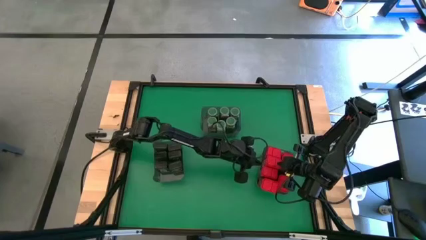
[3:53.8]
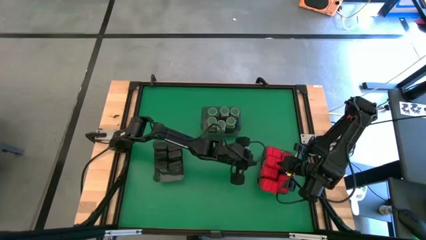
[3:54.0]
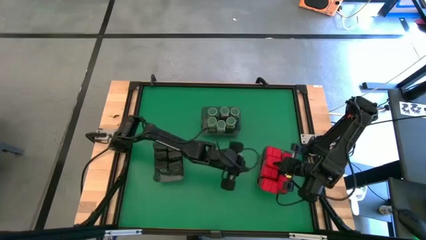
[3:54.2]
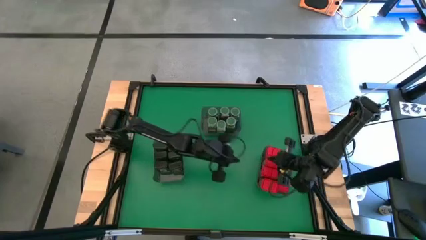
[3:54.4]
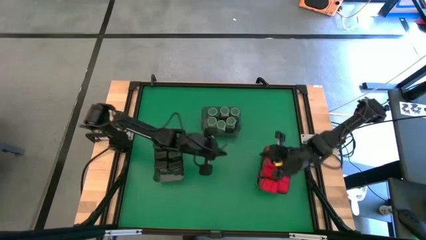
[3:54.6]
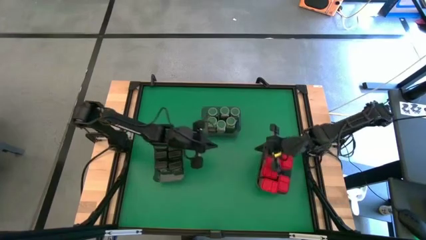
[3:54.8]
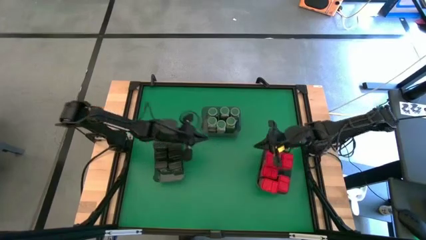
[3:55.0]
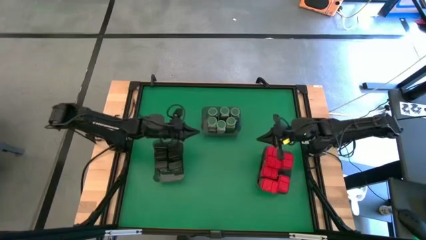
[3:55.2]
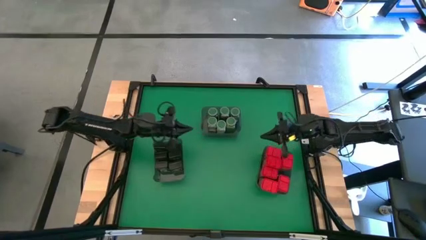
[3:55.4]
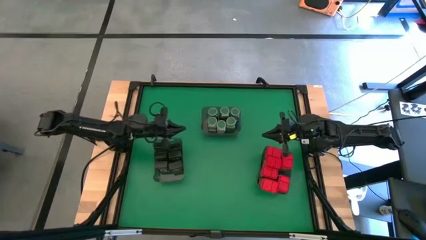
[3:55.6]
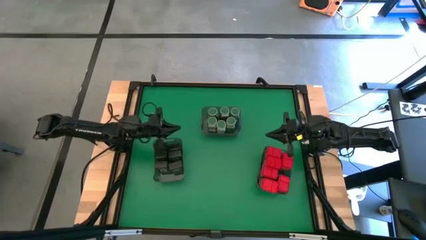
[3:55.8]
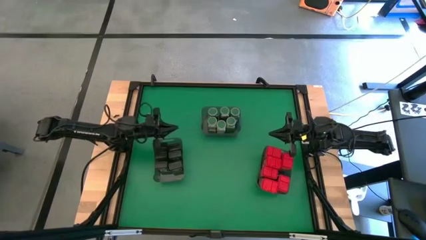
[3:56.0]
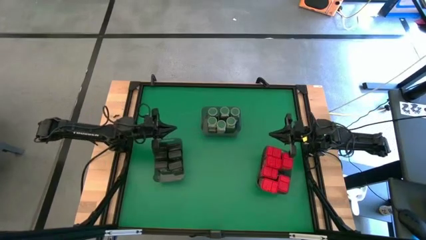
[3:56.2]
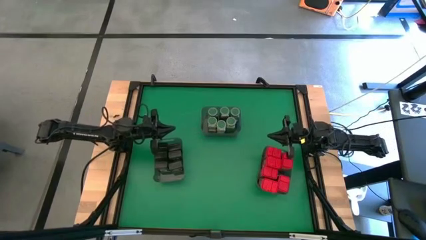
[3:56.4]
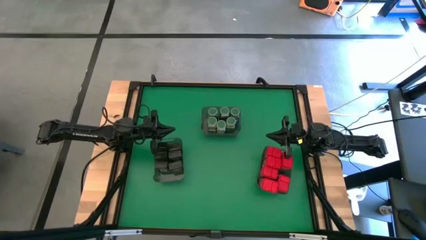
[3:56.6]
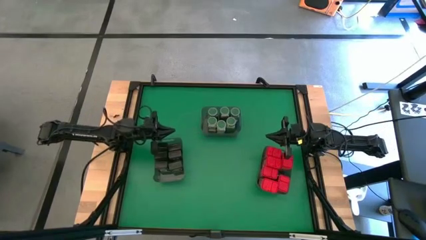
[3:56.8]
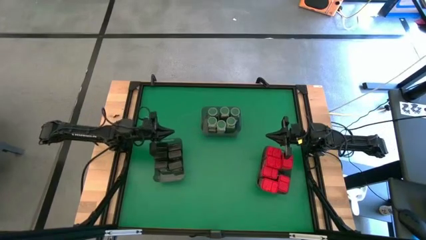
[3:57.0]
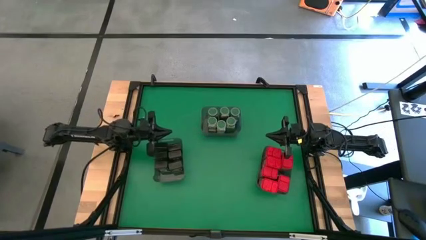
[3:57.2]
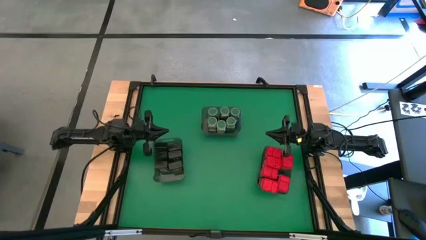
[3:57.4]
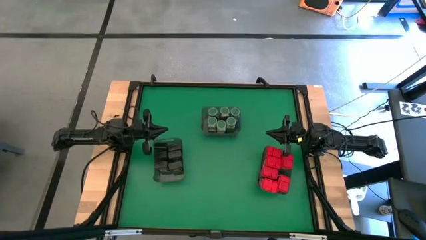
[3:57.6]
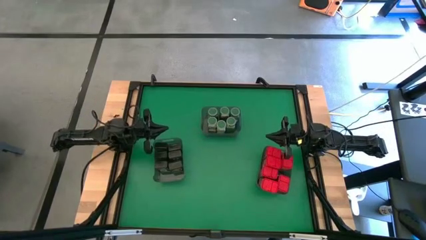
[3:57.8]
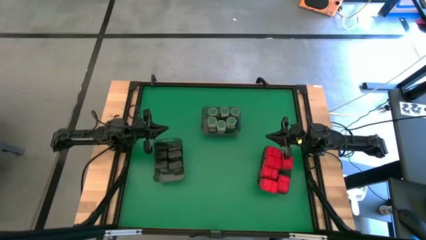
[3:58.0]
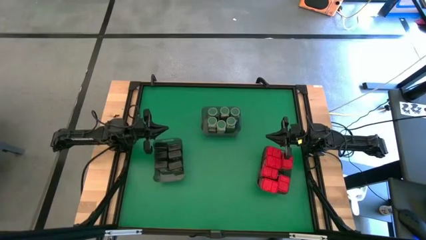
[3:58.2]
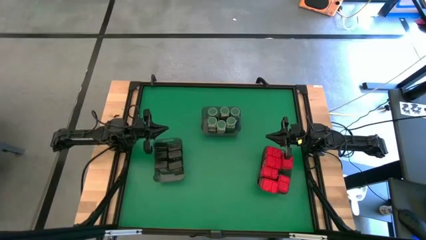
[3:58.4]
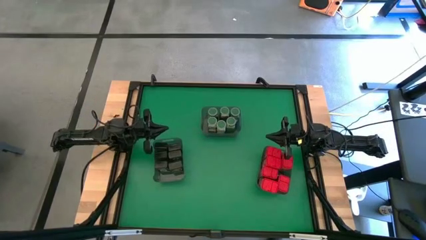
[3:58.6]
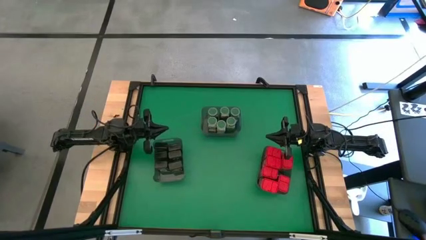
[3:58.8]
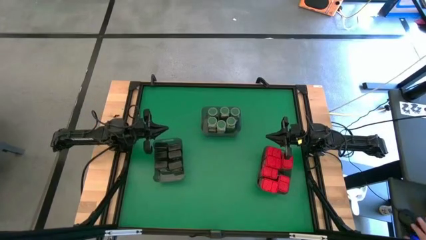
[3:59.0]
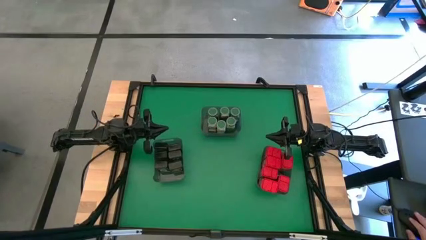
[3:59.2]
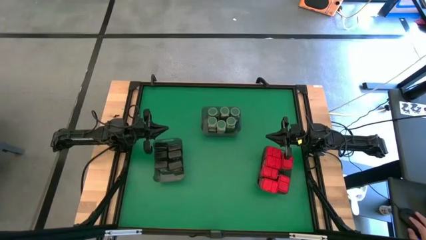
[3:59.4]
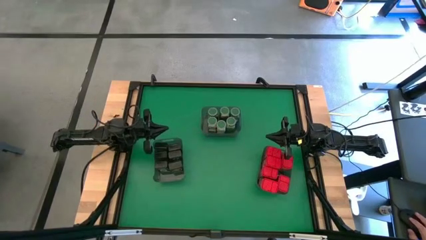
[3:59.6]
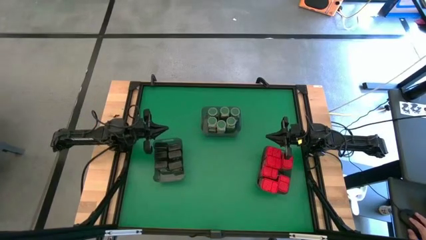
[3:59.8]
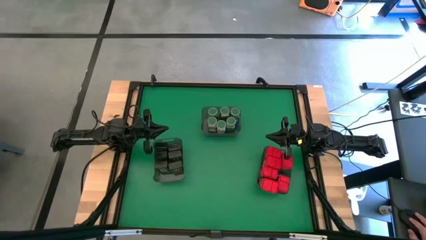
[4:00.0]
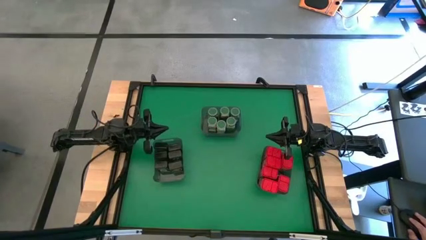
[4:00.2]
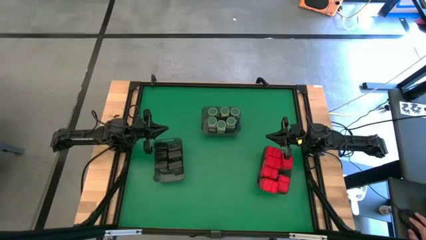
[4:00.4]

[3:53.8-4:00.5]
Task: Sort spices by type
Return to Home Position

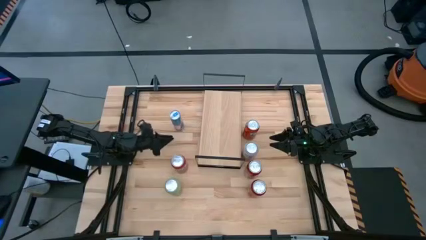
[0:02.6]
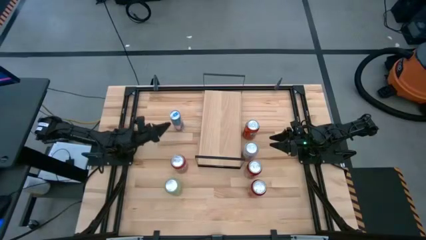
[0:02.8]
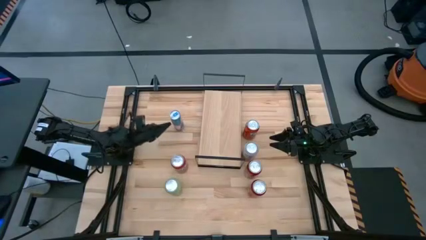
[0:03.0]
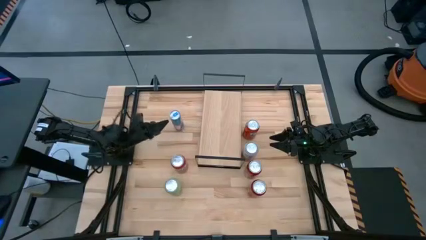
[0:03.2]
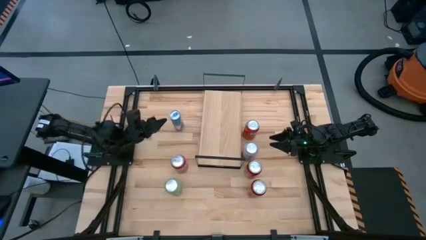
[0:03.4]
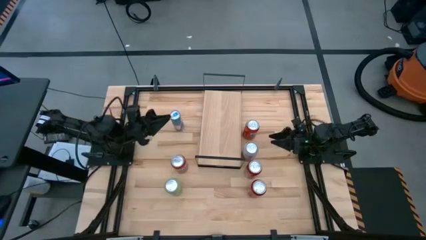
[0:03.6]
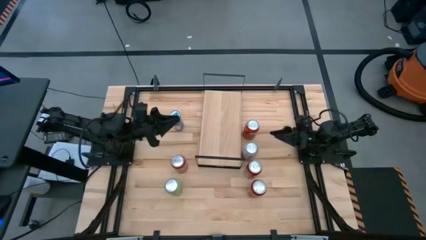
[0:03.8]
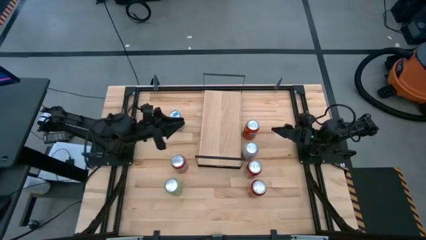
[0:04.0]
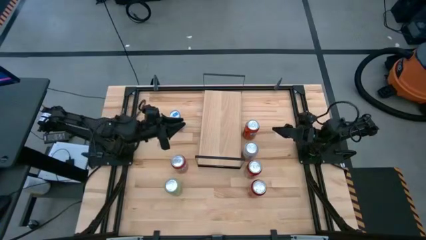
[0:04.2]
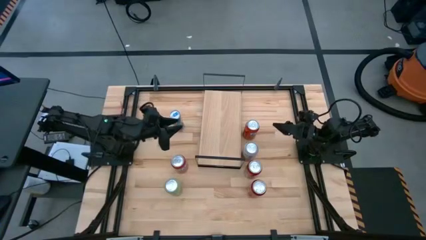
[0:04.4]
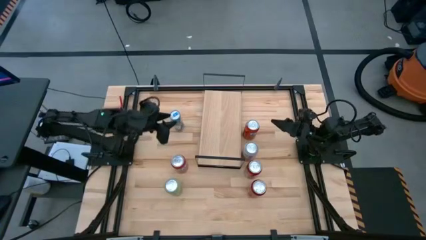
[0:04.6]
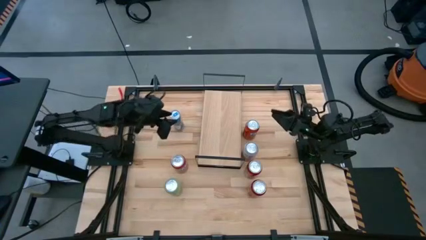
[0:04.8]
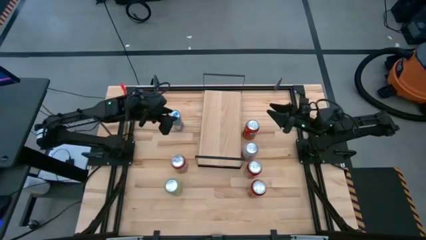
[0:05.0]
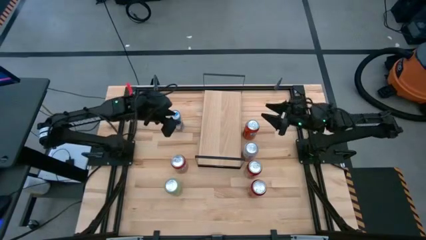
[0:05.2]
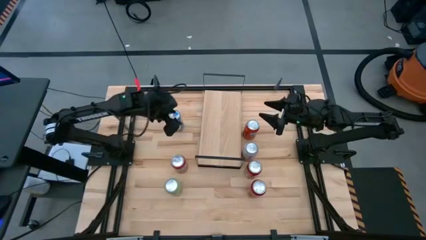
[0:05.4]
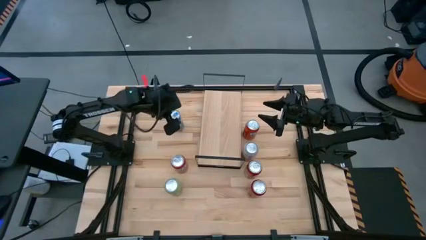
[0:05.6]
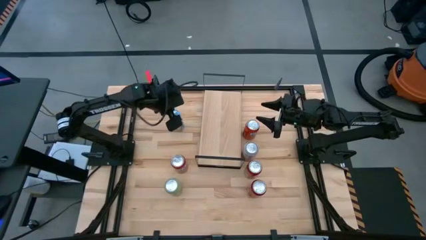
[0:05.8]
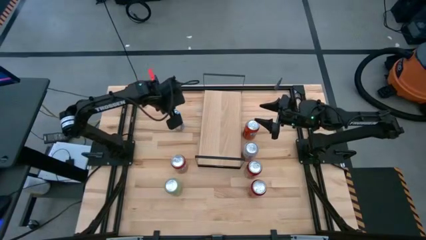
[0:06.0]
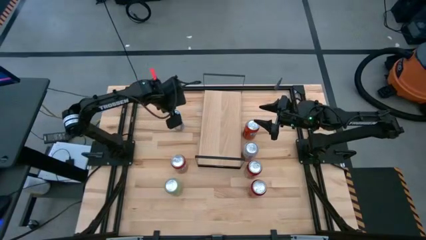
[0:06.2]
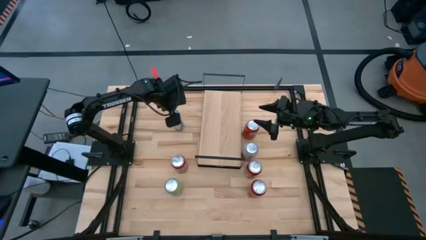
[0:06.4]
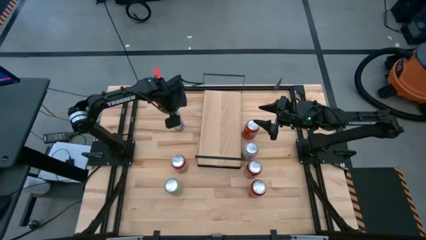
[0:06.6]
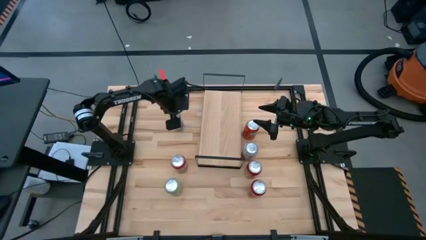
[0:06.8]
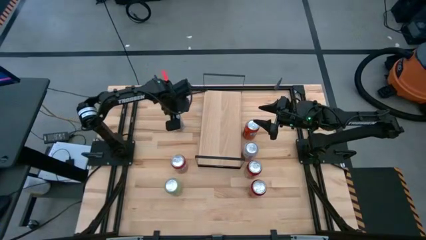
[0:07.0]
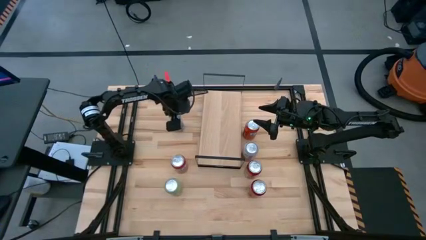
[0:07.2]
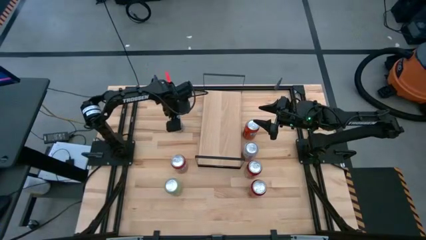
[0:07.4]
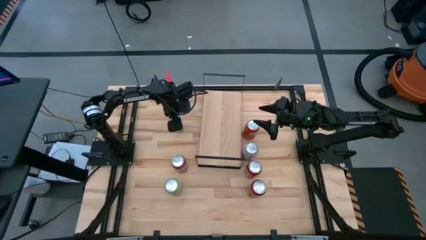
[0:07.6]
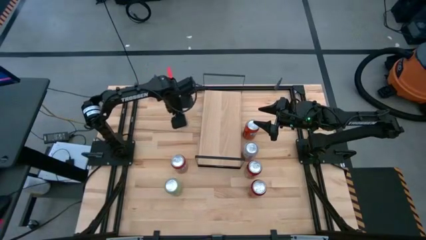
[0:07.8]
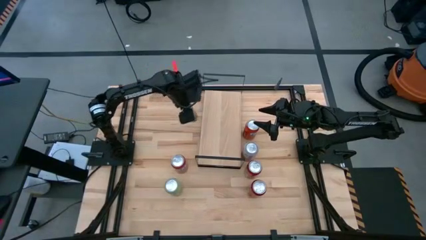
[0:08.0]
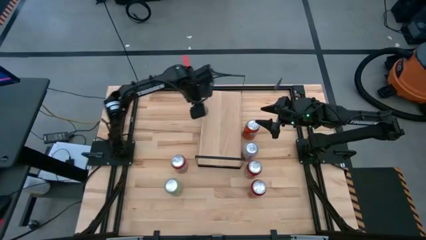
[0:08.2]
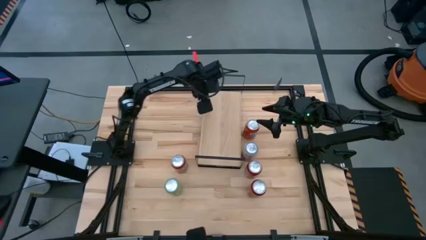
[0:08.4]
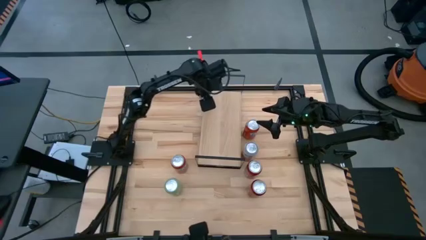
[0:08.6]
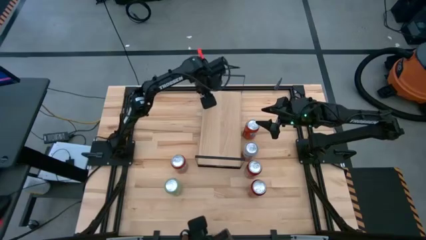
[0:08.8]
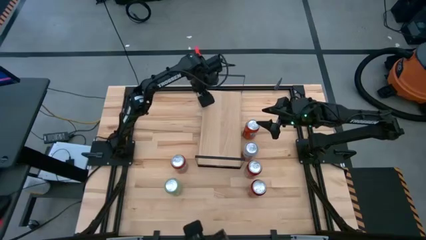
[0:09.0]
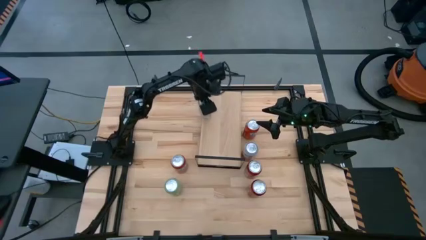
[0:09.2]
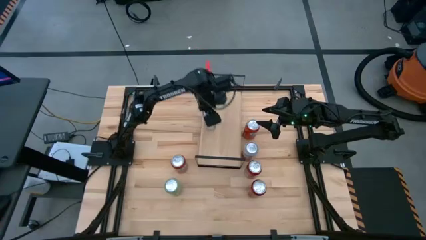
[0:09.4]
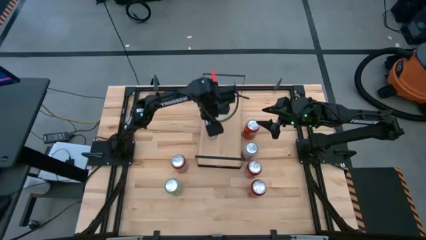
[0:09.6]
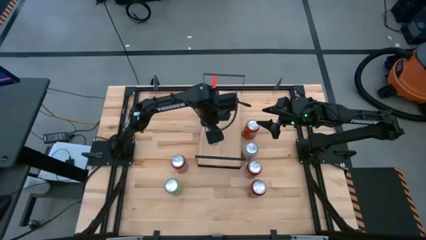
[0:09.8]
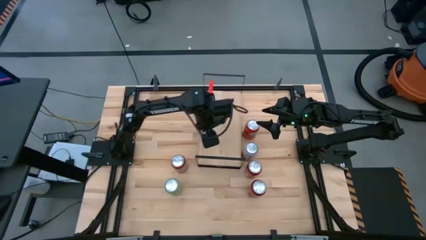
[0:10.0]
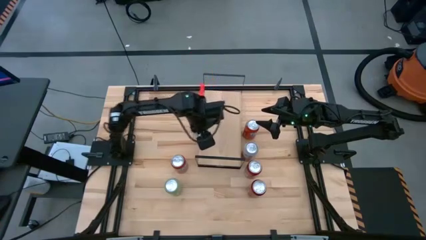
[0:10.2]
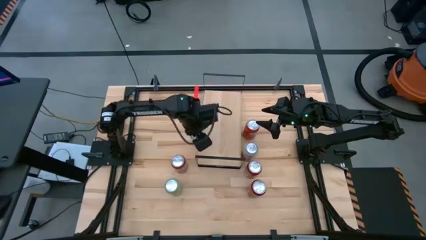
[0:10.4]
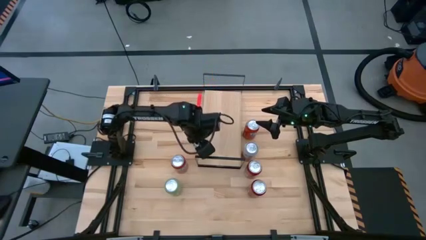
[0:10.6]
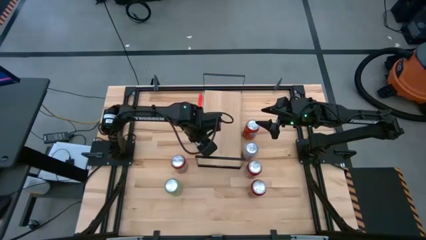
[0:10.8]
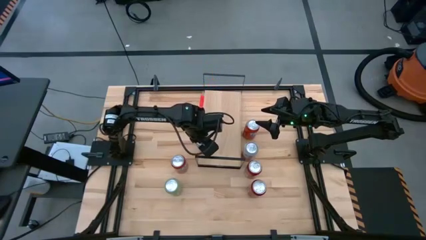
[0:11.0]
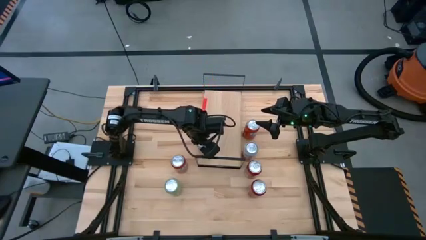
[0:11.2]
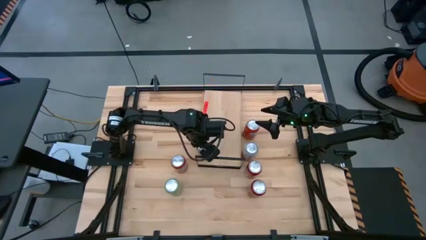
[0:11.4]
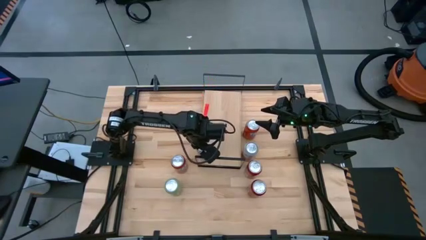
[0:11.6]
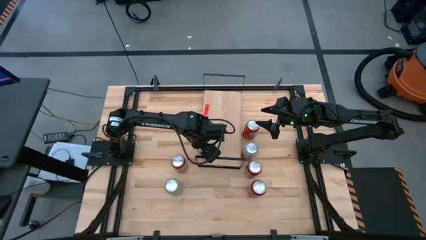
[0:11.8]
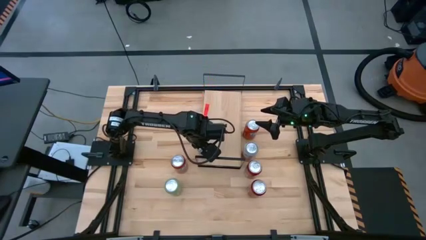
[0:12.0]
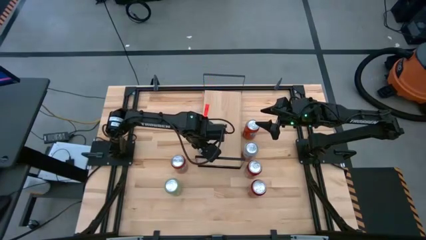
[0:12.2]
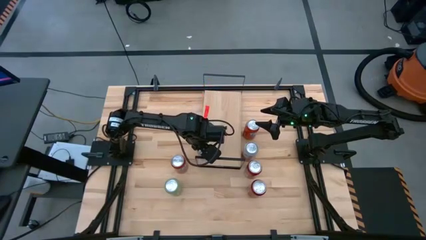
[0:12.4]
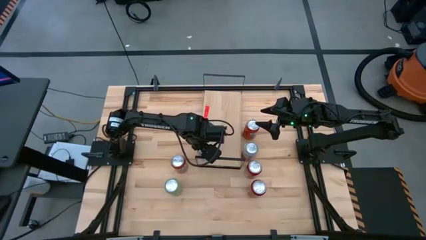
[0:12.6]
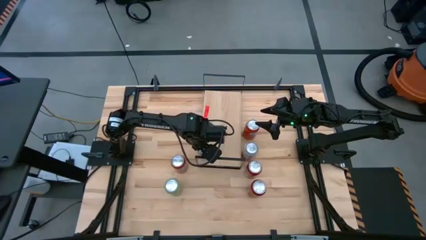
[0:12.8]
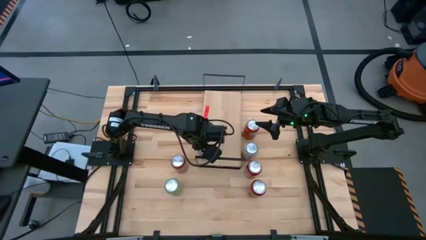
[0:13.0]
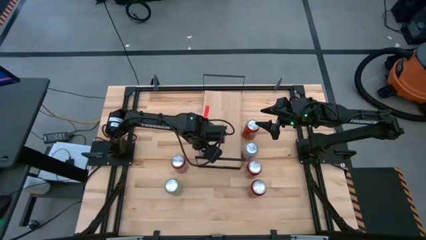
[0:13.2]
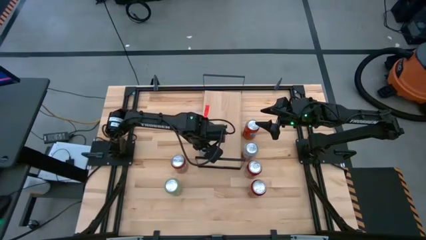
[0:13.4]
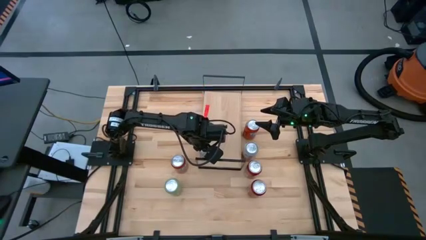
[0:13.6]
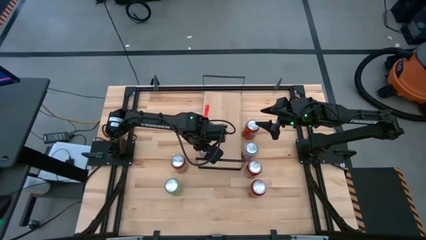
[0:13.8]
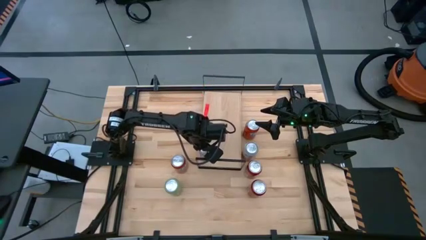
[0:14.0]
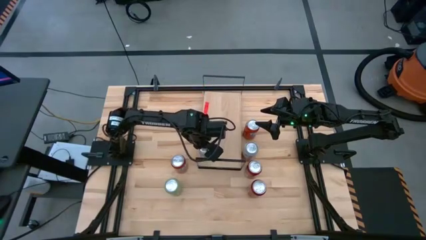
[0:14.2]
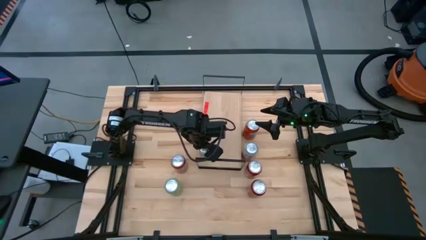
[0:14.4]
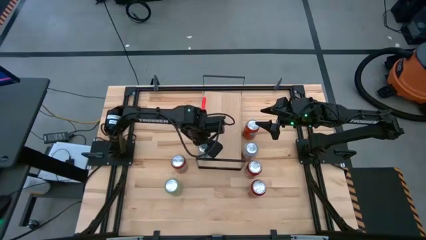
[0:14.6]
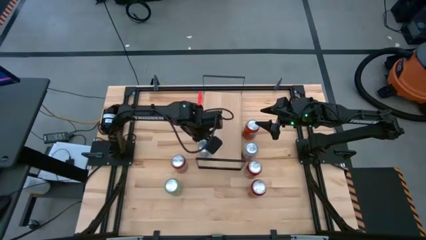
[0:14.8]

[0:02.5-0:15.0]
Task: Place canned beverage on shelf
Put the blue soda can on the shelf
